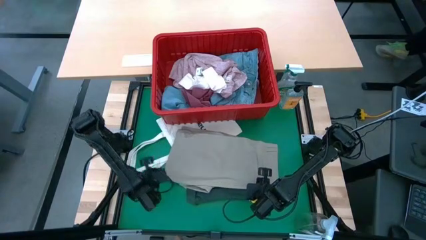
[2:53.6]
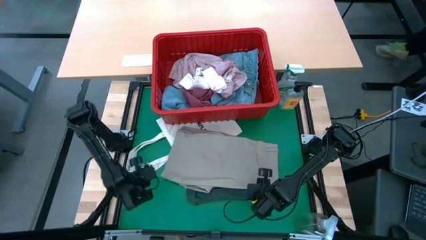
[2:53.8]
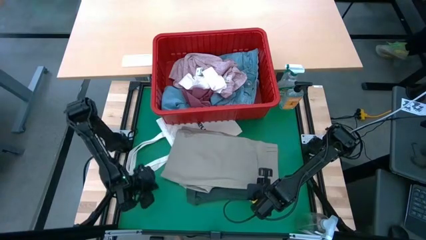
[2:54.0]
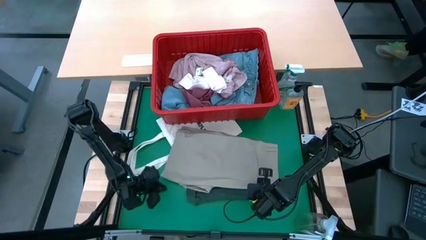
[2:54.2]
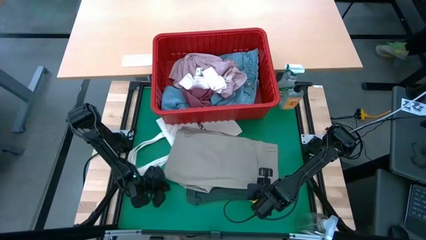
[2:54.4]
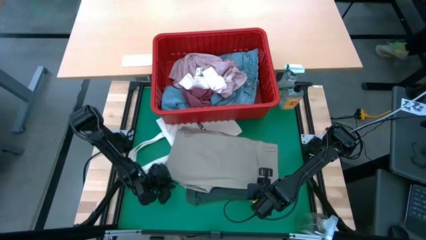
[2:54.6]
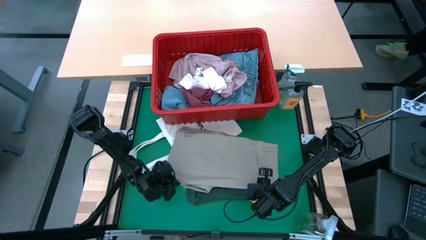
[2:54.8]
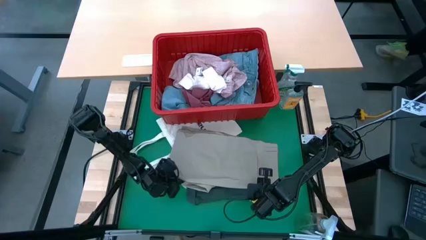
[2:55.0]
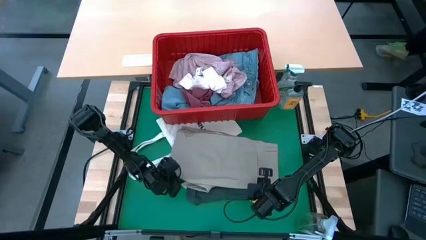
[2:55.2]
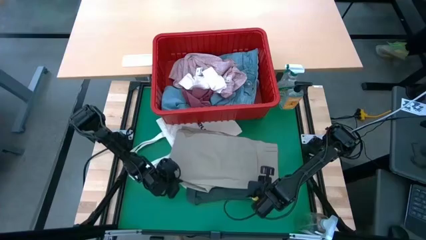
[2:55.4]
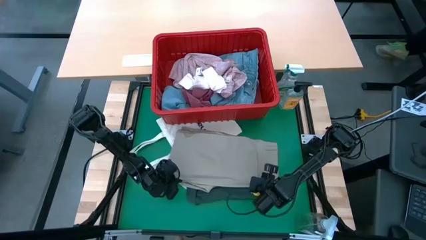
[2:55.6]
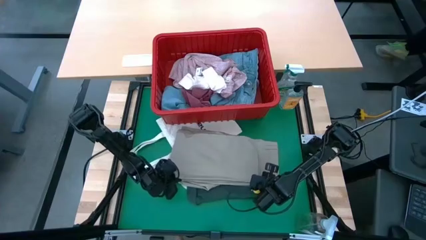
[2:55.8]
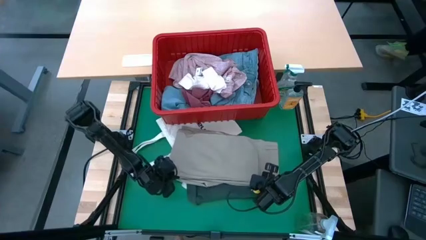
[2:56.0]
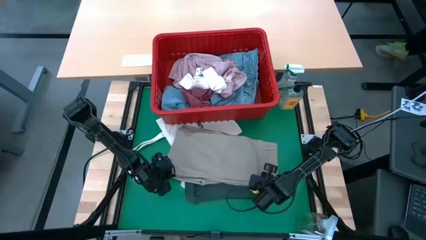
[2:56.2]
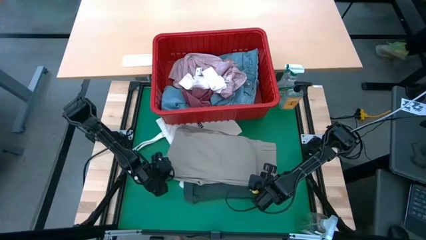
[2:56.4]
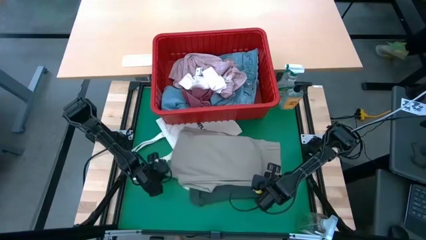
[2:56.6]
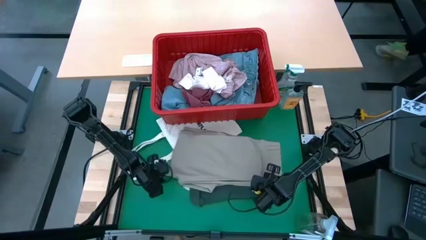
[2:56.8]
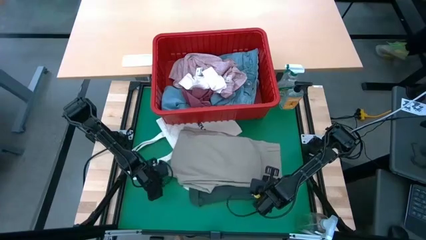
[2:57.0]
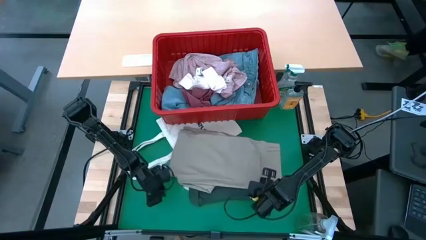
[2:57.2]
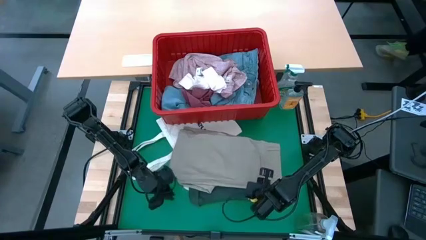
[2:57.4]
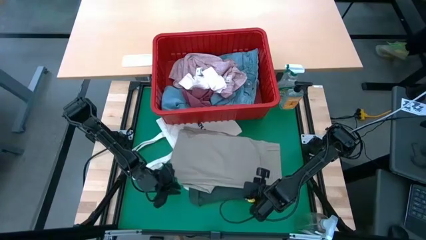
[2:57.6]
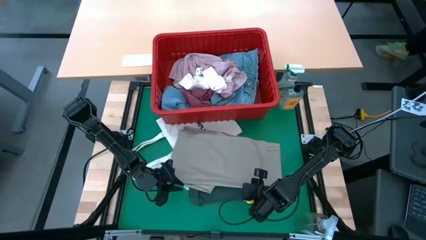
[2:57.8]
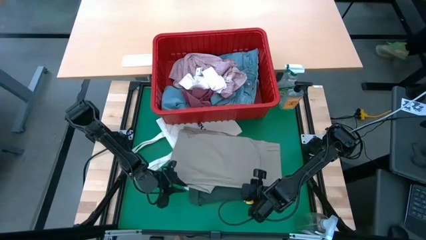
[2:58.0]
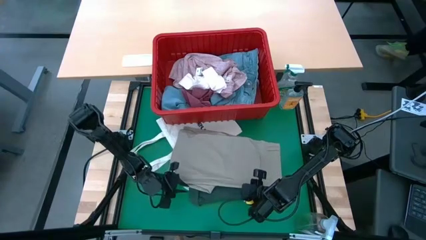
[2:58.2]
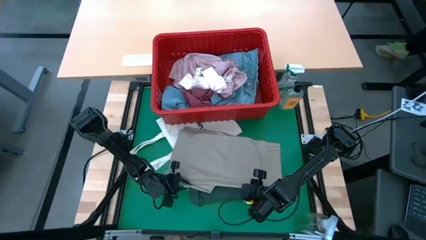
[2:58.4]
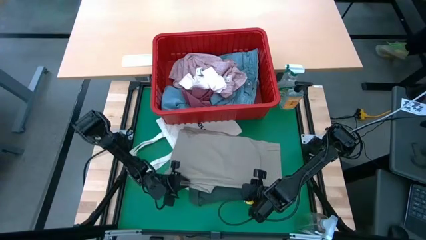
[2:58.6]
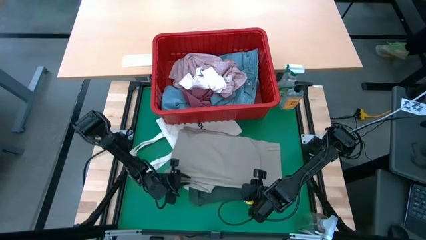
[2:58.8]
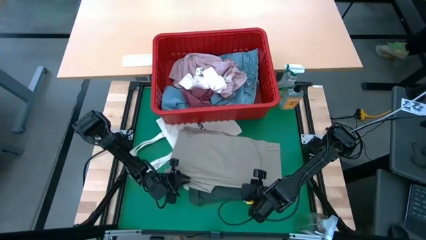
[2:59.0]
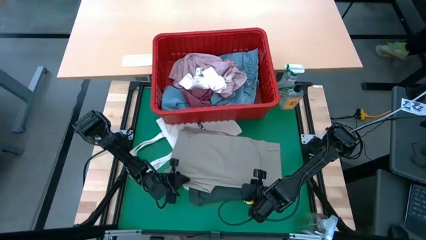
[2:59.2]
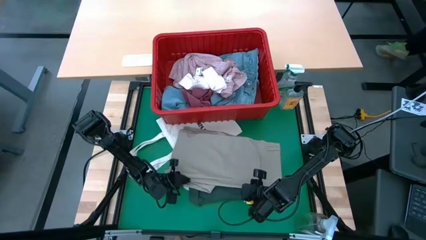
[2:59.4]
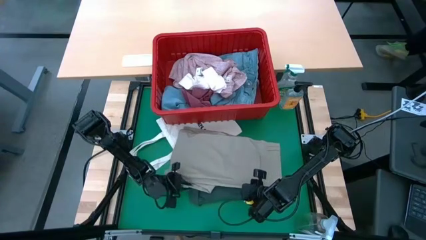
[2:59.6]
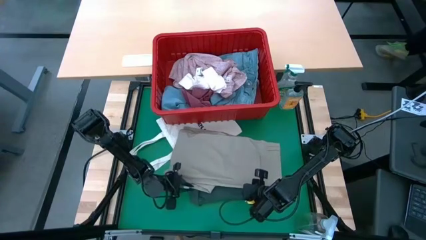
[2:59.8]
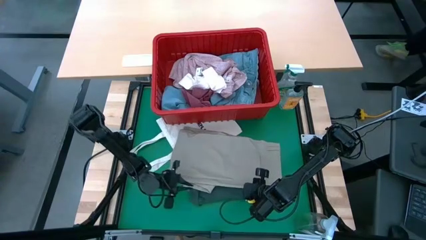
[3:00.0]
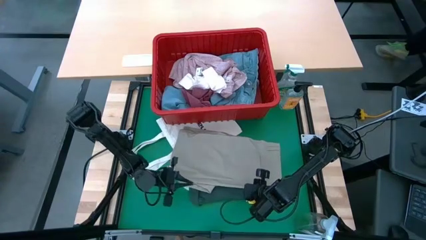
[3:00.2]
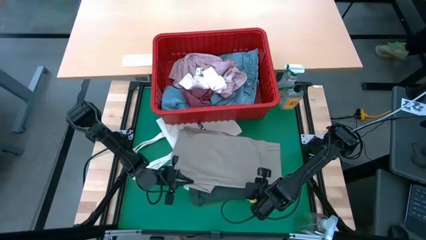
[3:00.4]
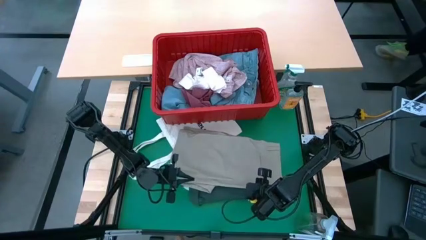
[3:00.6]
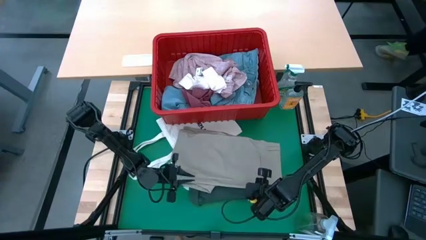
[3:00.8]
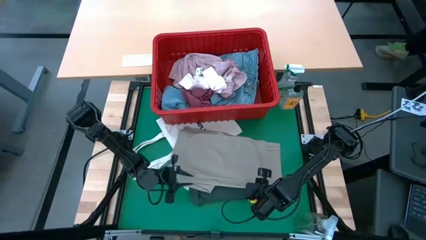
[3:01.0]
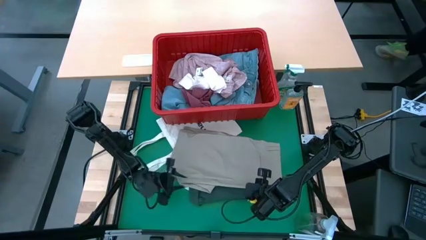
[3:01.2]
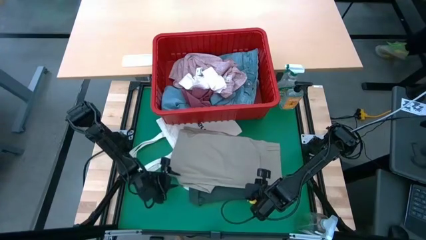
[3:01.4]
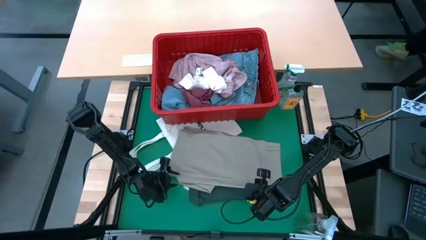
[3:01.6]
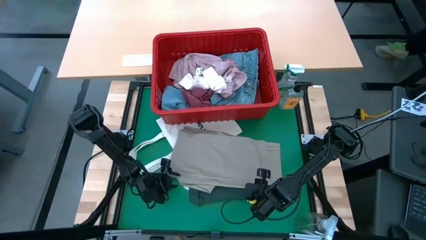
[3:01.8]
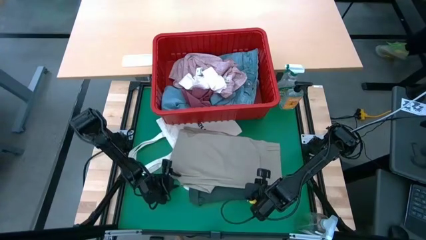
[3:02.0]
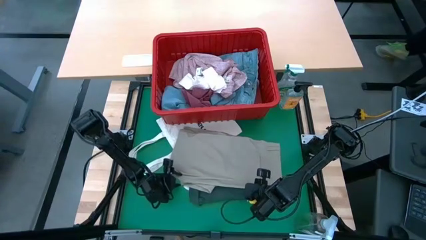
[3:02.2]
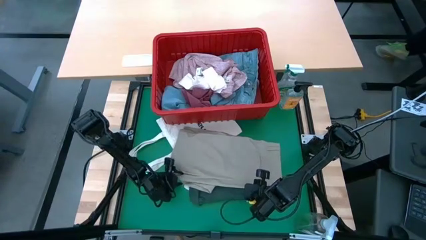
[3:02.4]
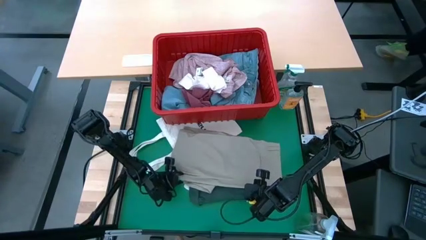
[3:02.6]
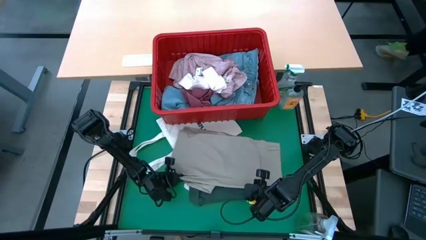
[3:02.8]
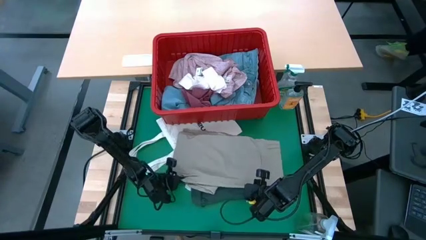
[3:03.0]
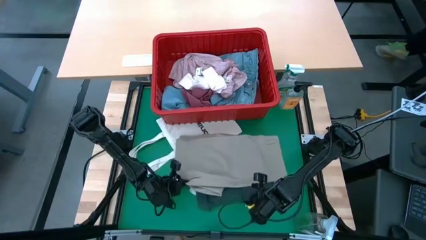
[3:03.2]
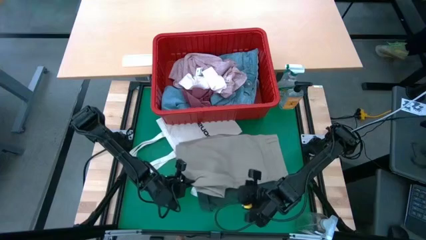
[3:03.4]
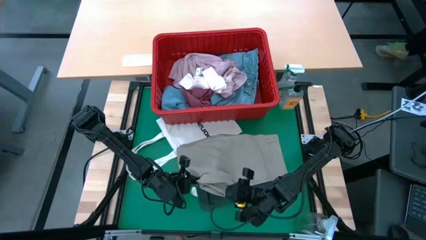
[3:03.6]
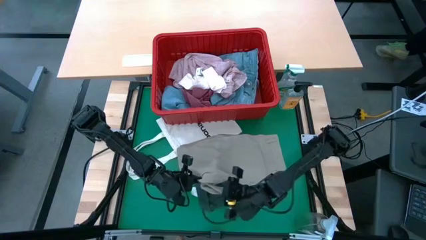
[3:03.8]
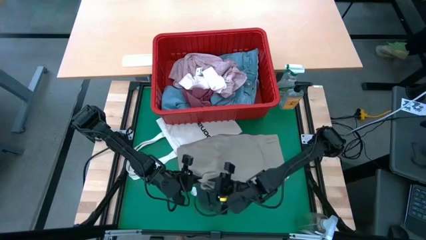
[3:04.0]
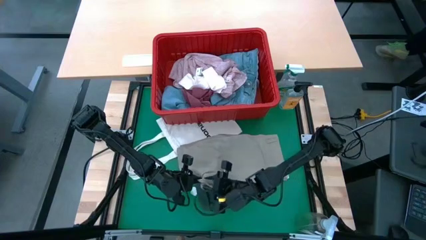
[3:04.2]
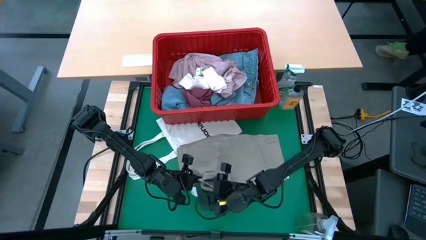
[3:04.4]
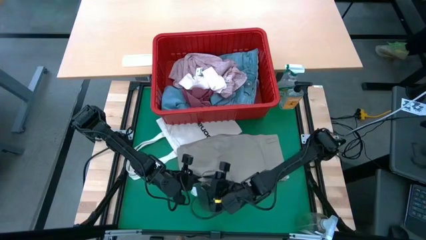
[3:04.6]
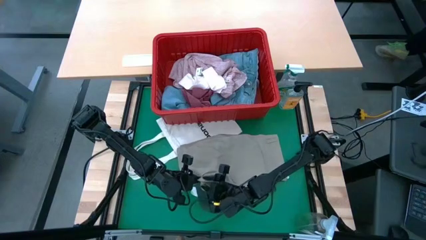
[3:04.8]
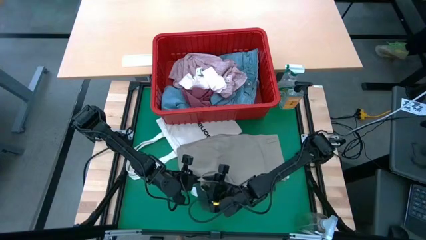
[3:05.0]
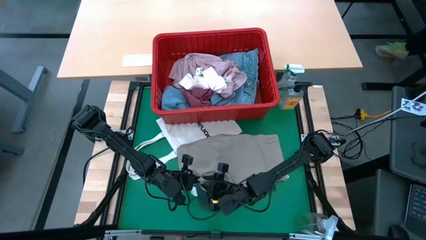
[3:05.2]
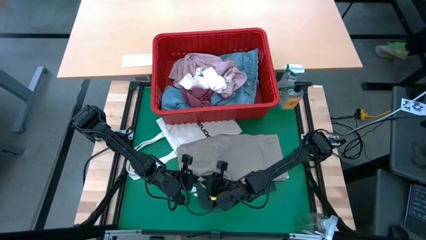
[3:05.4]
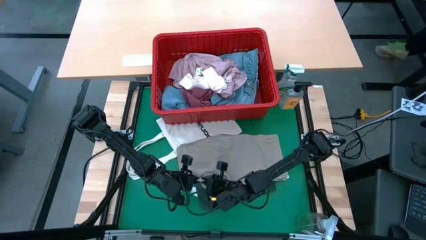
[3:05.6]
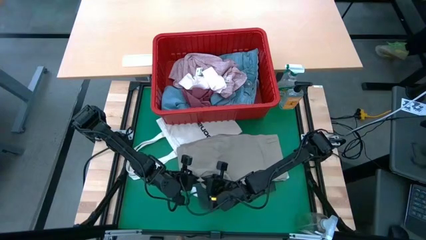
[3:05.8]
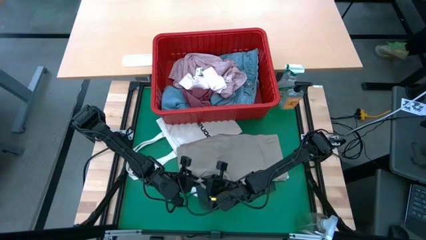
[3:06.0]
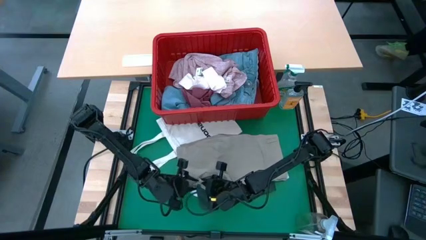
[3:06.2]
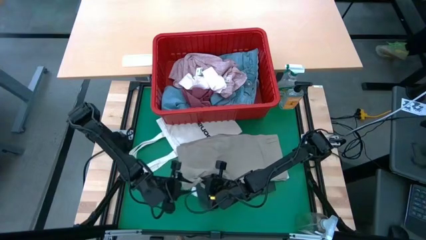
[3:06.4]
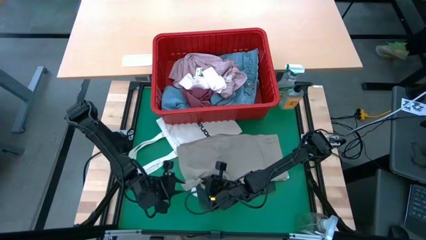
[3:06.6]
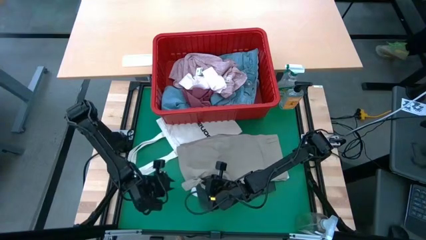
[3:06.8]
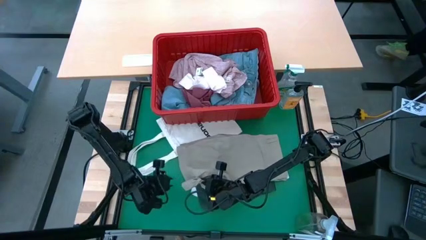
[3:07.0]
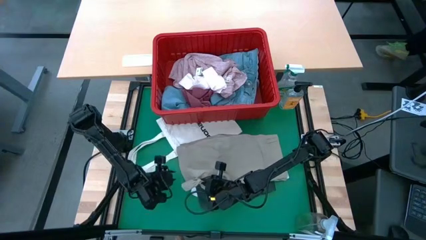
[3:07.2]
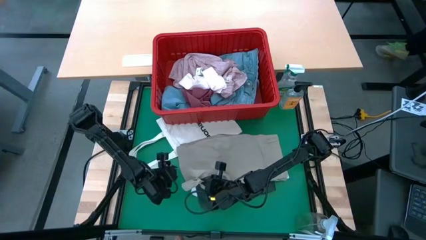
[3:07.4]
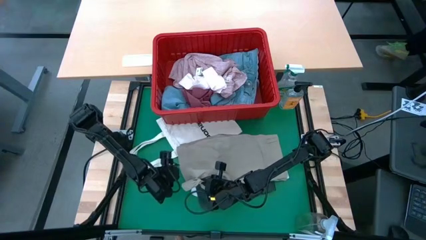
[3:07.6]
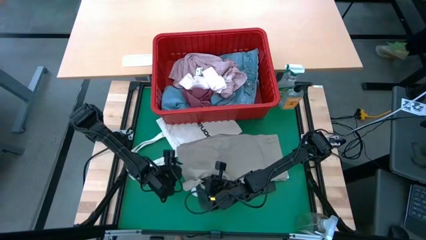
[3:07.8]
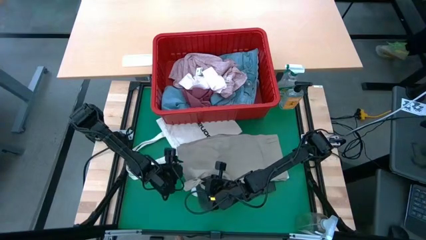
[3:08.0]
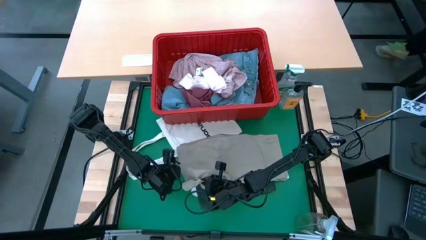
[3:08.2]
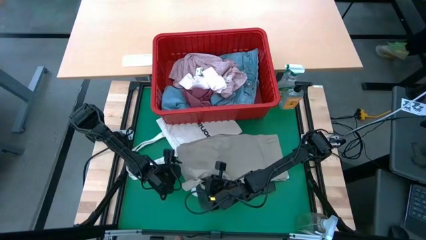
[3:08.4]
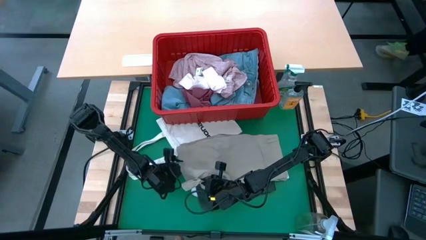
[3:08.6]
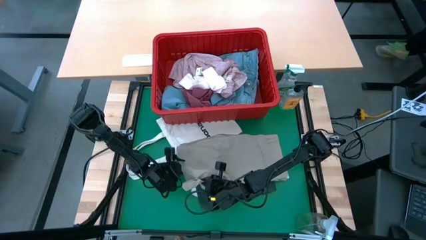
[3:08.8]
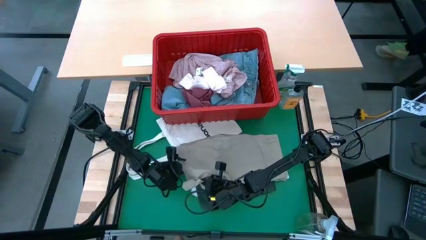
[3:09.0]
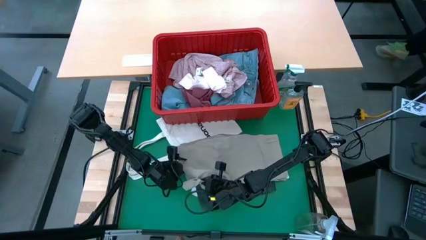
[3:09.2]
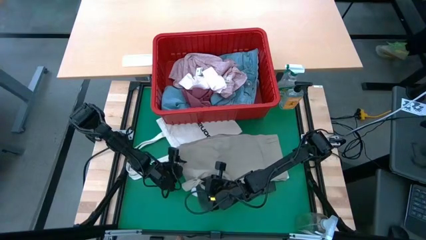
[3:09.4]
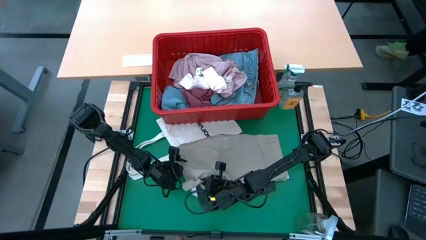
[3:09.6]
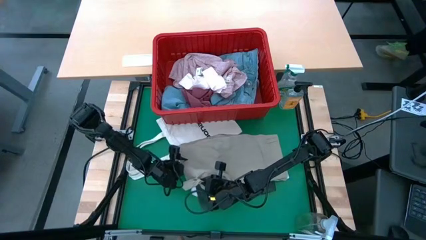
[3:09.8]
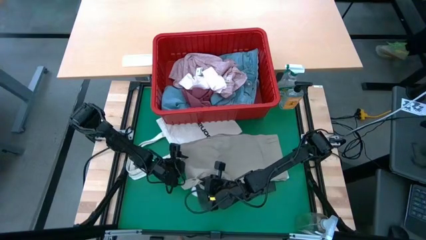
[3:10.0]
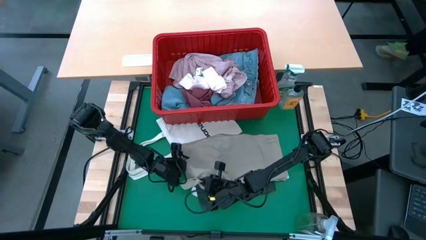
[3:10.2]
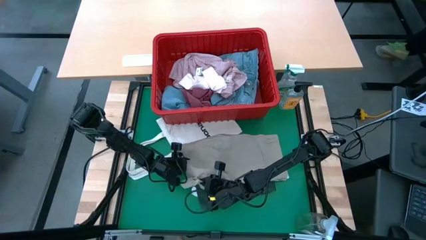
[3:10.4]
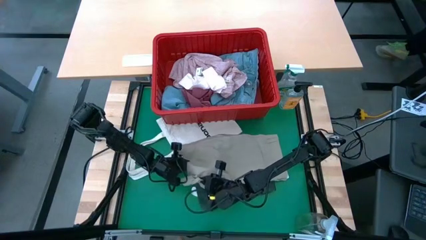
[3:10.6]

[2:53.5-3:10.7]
Task: Fold laundry
Fold the grey shorts
